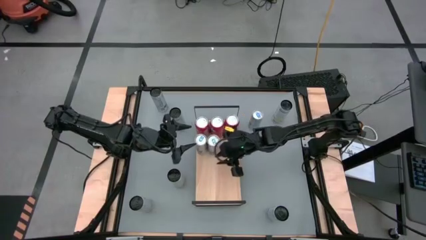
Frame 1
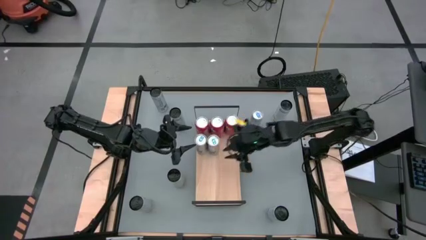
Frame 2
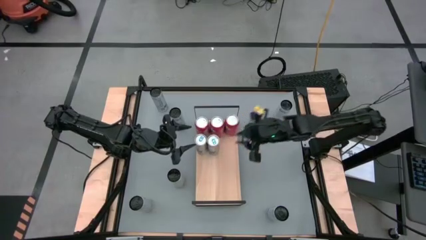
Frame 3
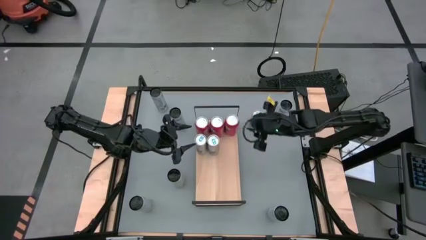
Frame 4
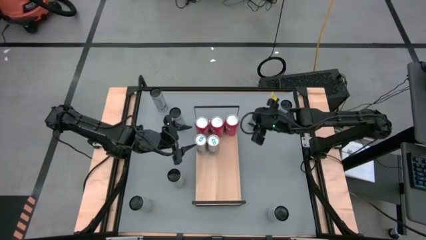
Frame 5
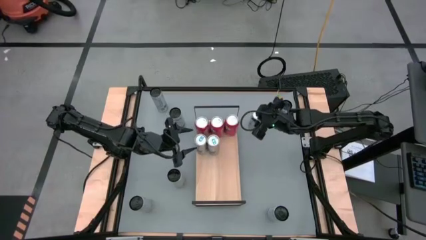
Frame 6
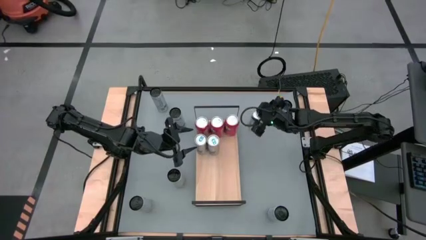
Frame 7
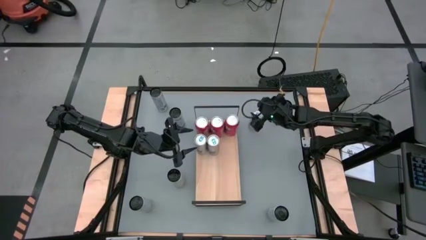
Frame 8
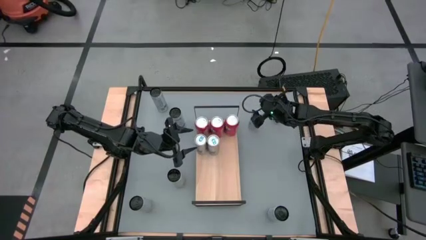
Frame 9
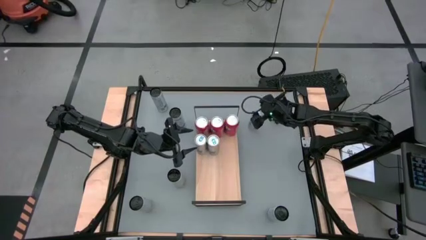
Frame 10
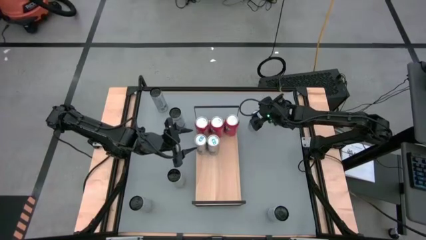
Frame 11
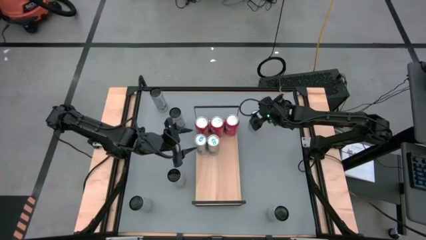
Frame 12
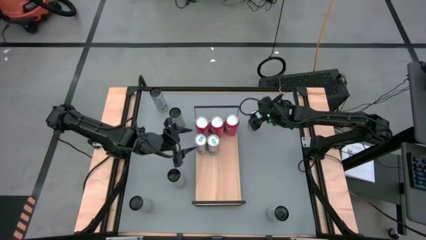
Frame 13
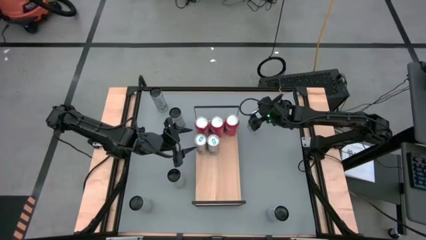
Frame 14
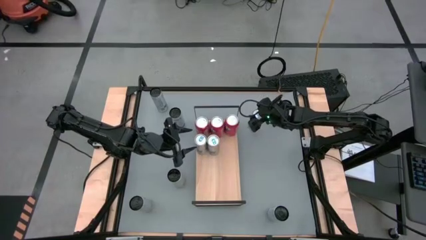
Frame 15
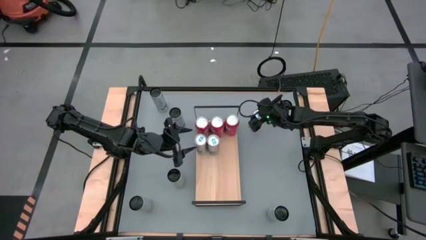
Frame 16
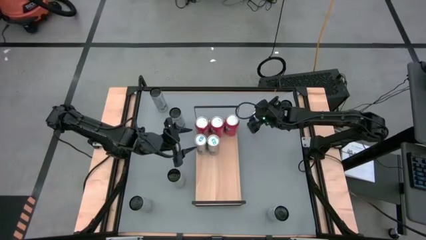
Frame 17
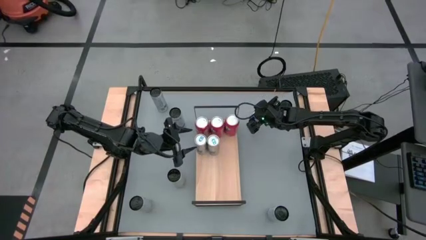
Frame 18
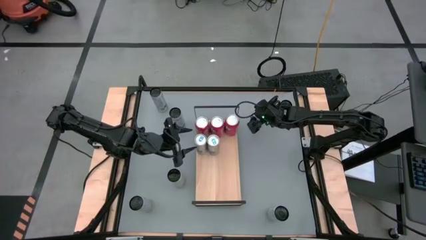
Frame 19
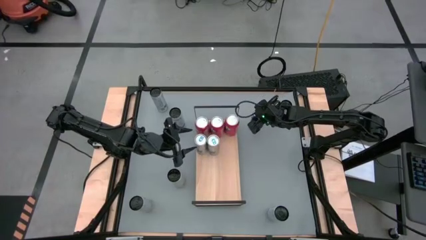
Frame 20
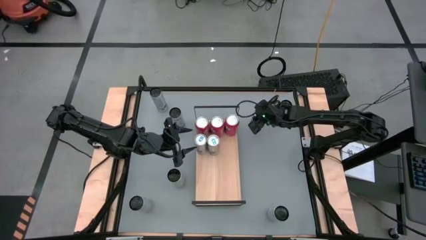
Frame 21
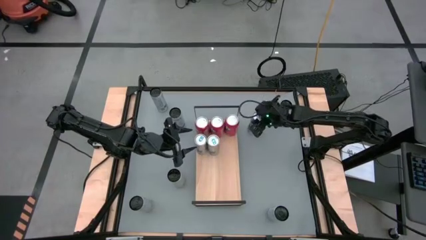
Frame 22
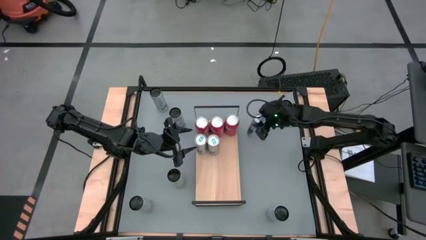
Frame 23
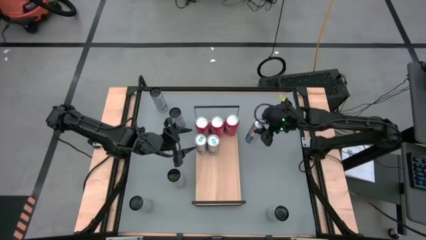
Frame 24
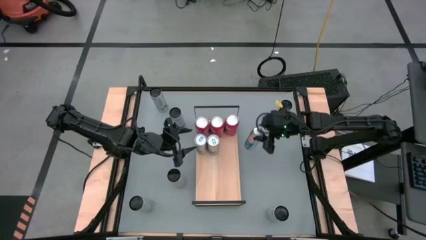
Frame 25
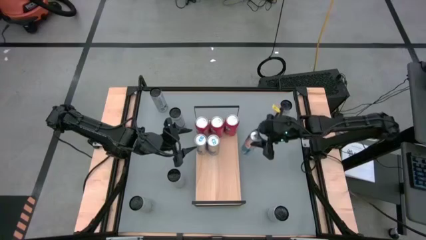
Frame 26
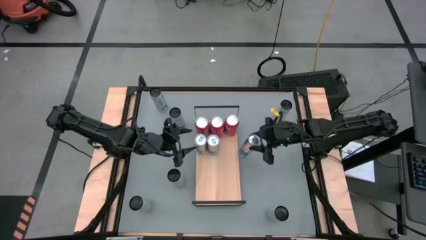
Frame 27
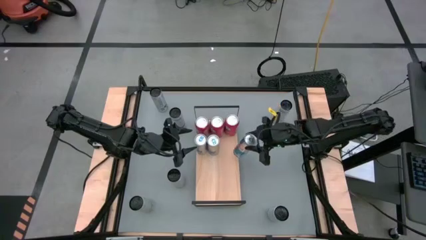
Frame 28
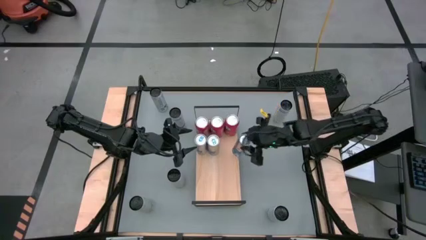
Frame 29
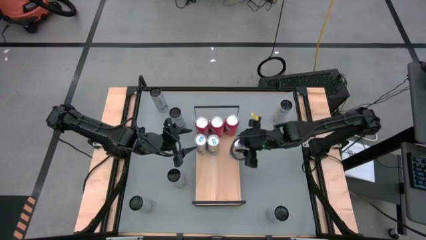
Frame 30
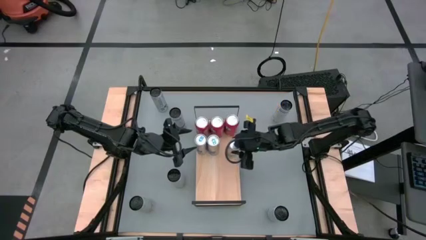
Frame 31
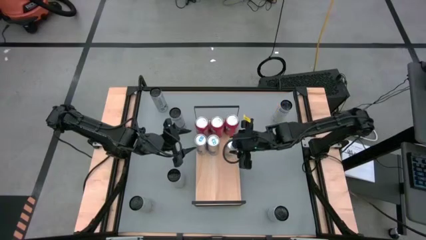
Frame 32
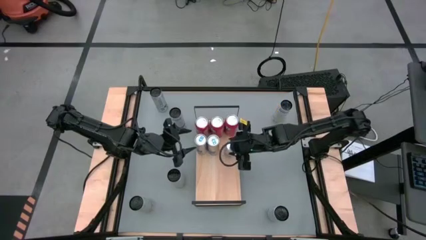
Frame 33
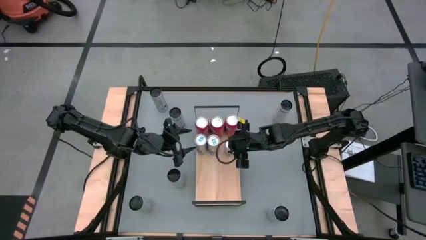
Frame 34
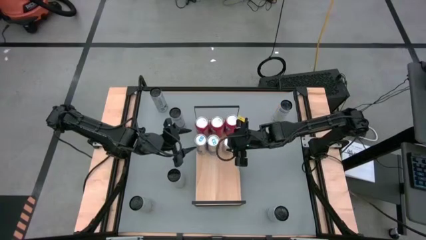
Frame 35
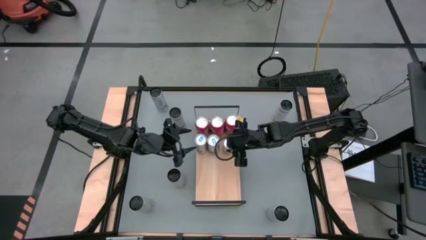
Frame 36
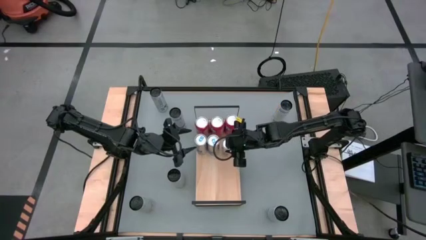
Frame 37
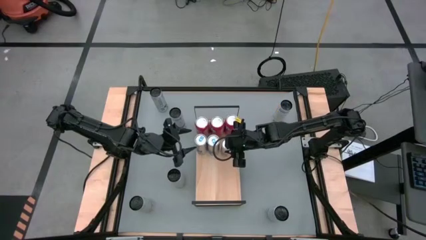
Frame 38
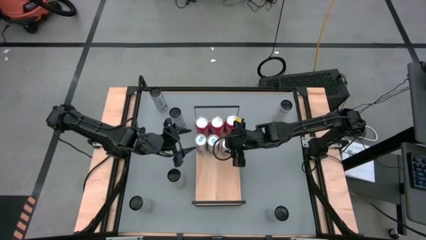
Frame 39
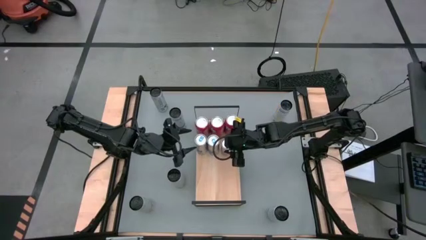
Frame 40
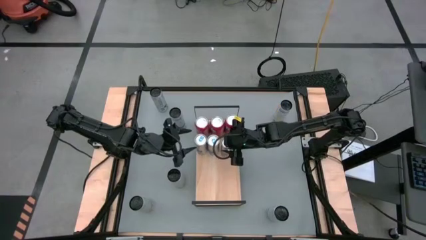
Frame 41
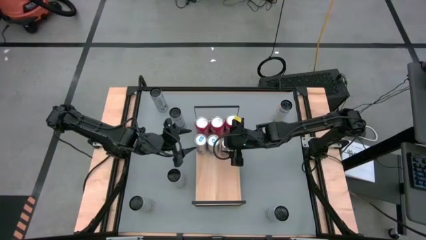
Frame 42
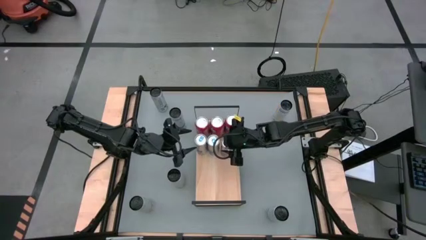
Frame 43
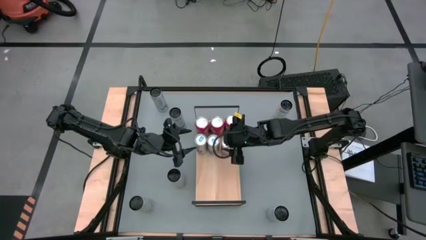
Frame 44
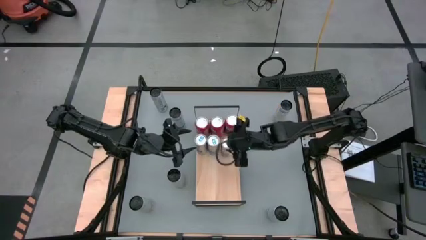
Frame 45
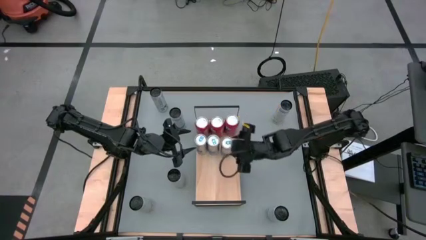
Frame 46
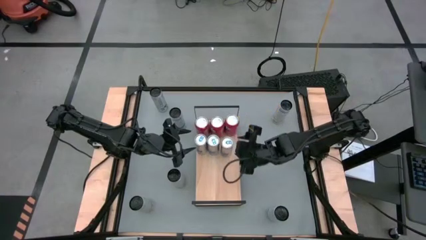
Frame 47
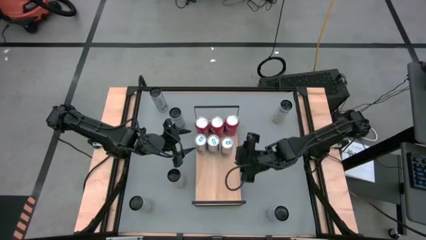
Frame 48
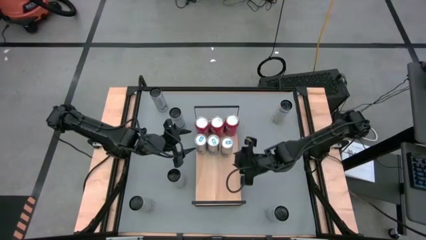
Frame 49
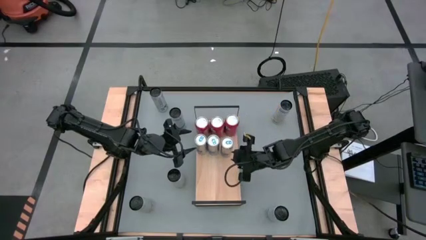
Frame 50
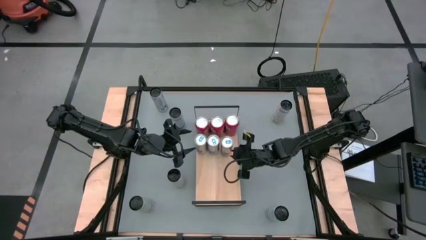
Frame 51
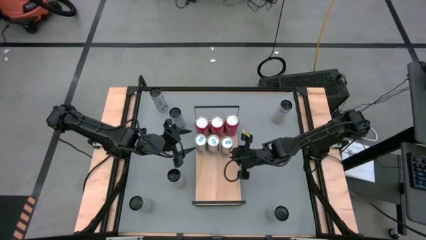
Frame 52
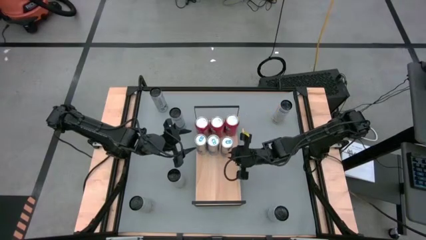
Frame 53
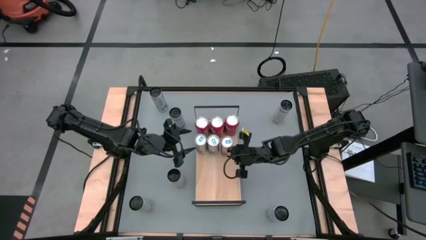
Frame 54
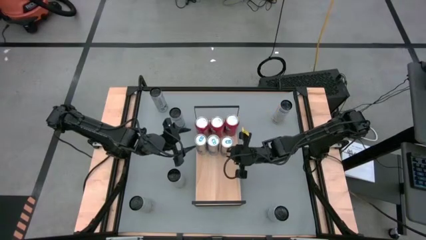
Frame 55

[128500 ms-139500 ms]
Task: Place canned beverage on shelf
Put the blue soda can aligned with the other blue soda cans on the shelf
